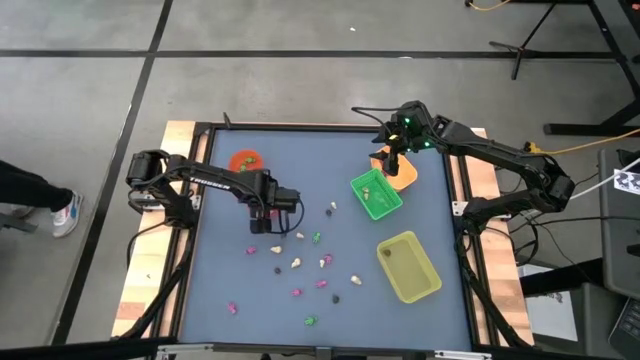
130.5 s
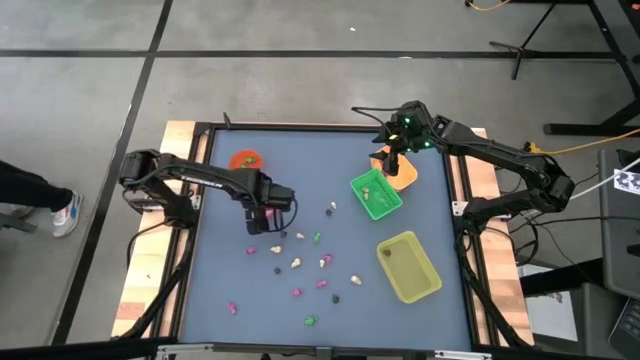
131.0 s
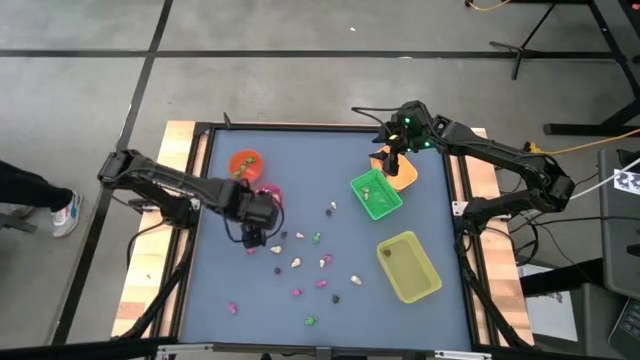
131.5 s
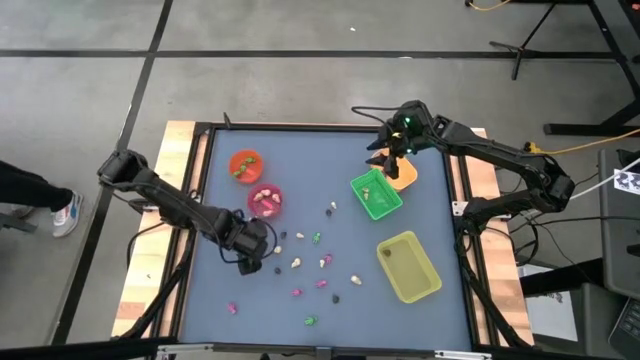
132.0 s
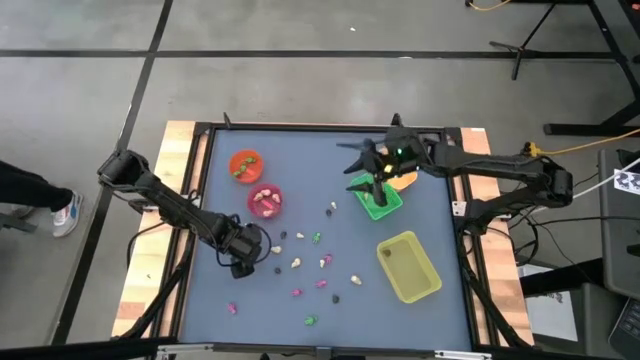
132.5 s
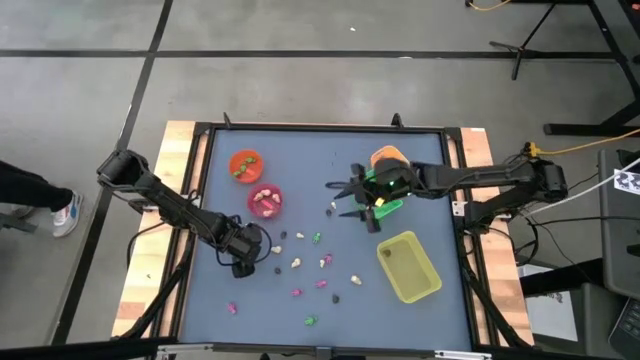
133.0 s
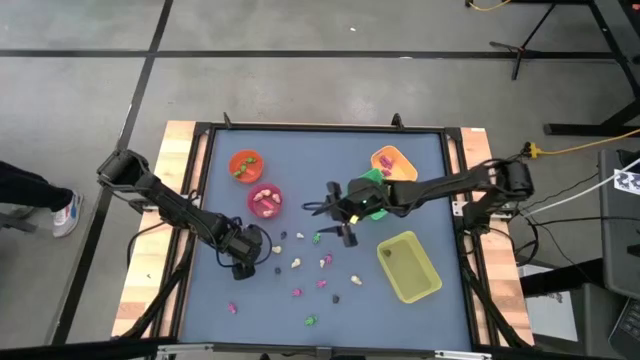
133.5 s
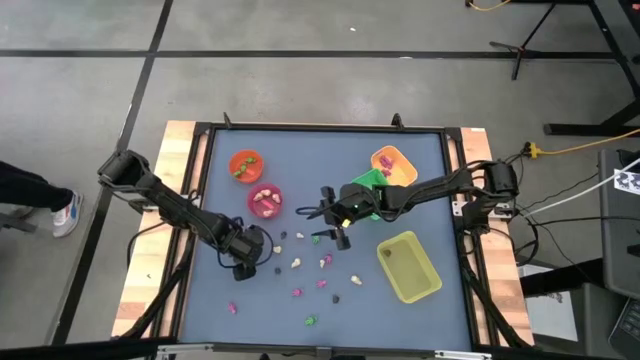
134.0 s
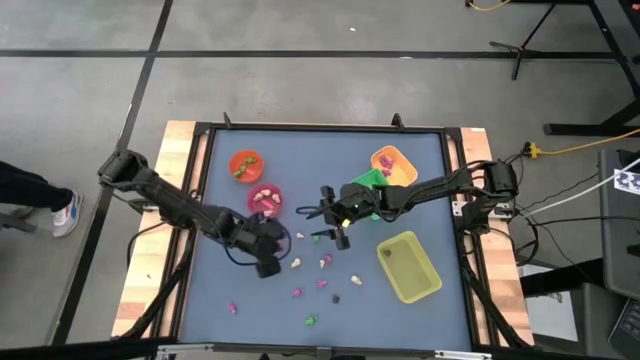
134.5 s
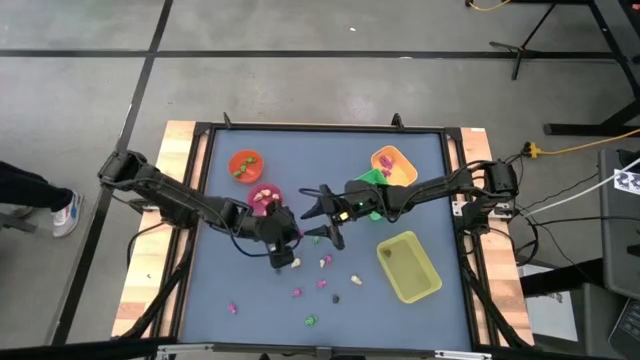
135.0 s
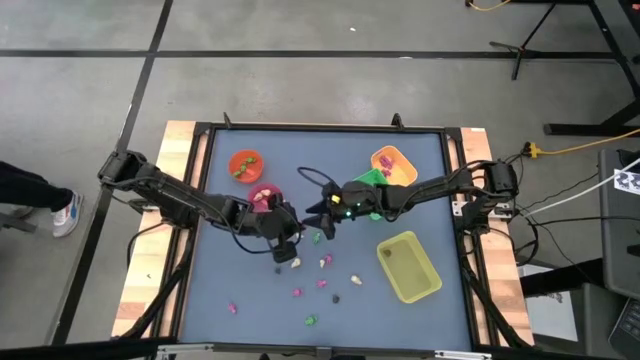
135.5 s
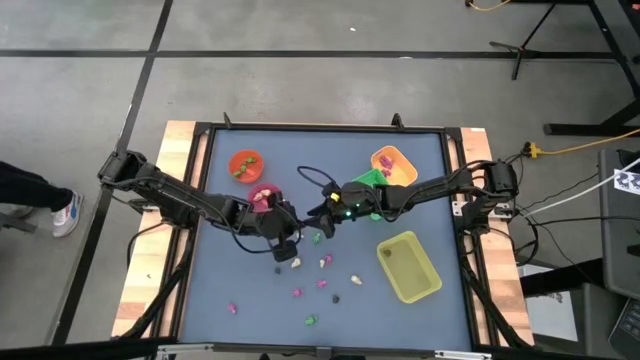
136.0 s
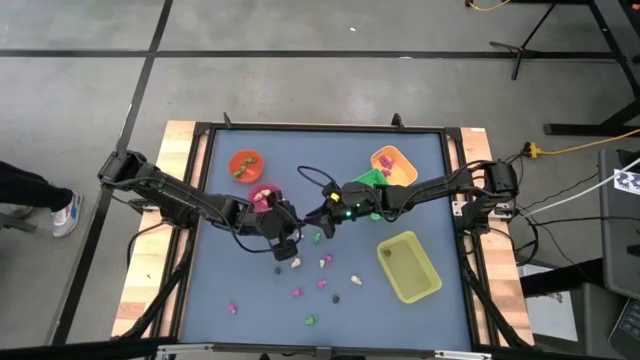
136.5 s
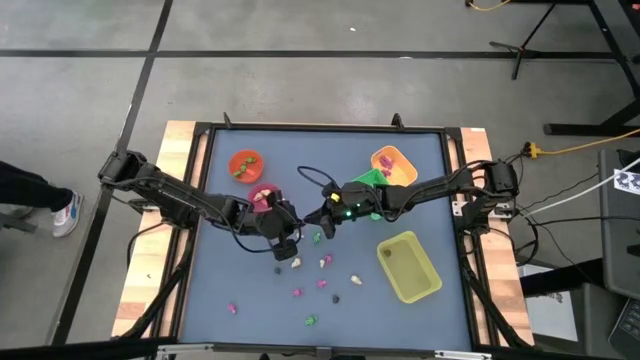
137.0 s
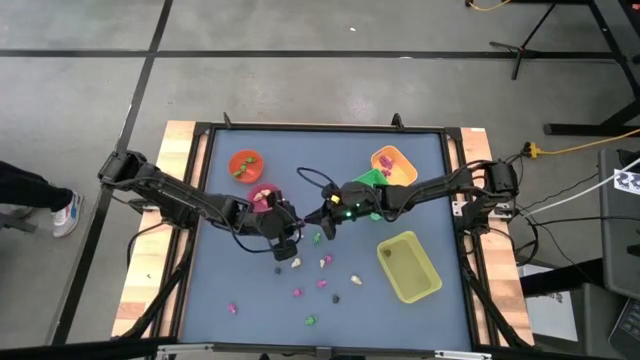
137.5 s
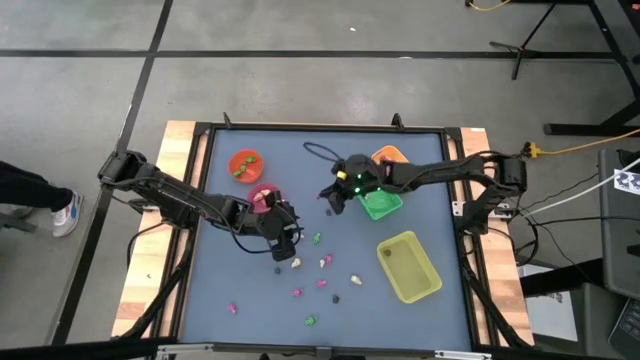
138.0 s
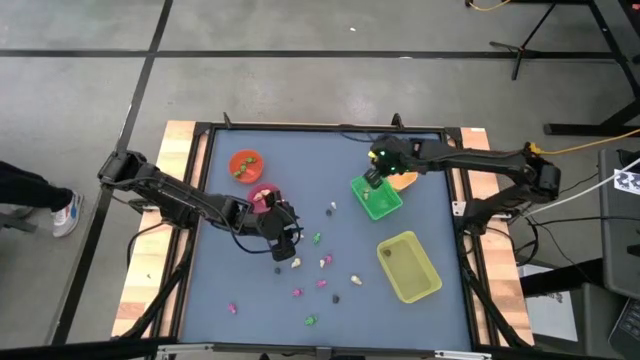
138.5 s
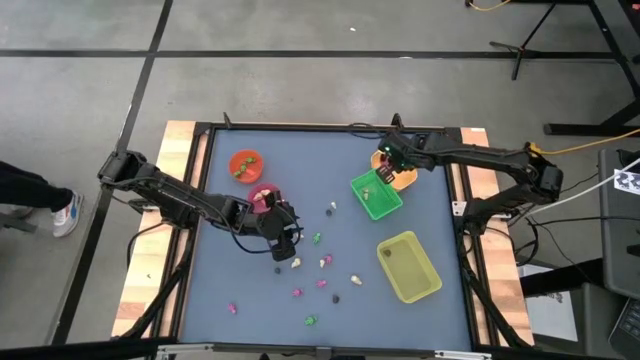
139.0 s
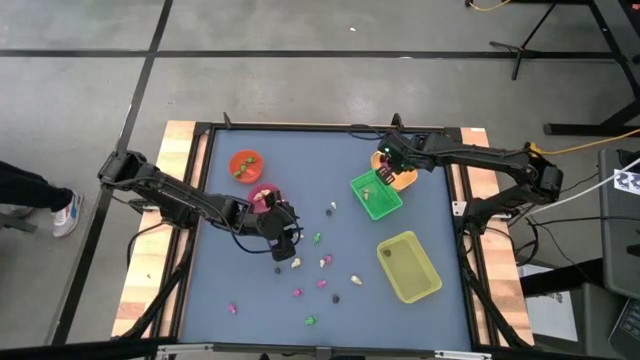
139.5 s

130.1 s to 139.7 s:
Task: Sort Halloween decoration
Put the pink skeleton toy into the yellow bin

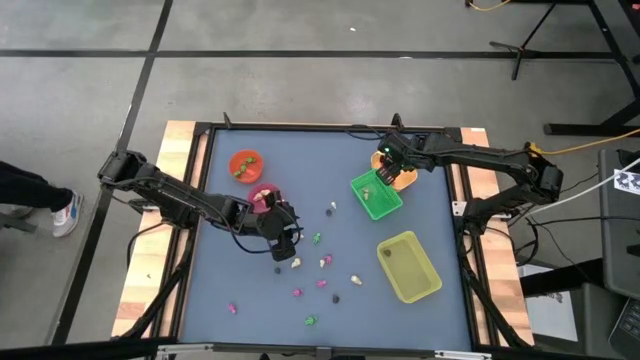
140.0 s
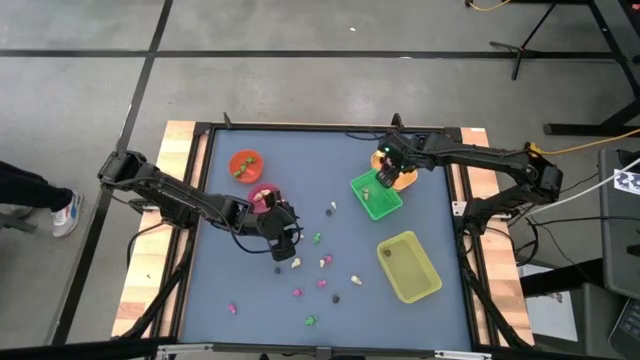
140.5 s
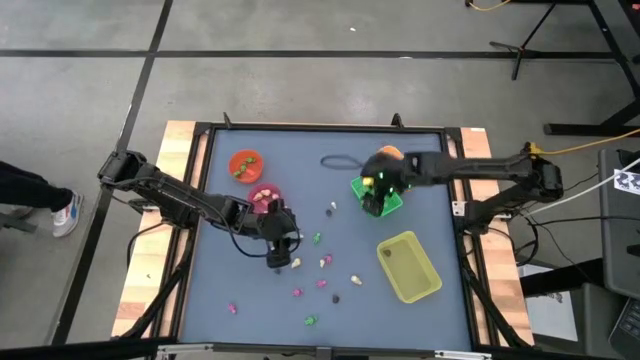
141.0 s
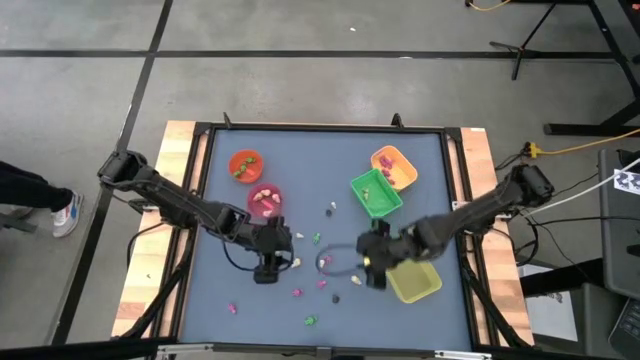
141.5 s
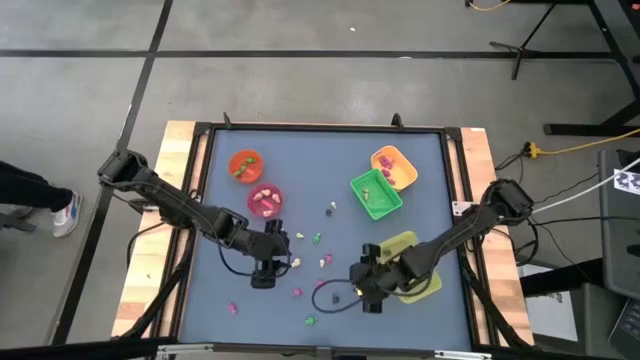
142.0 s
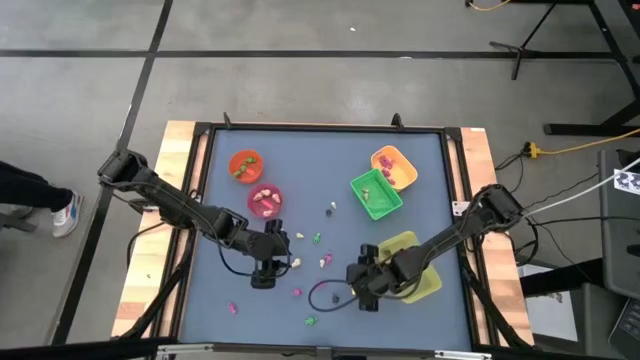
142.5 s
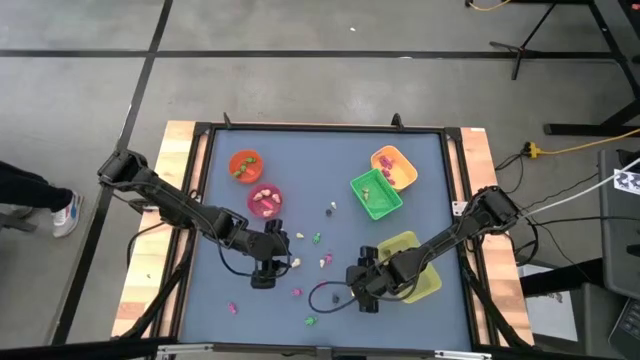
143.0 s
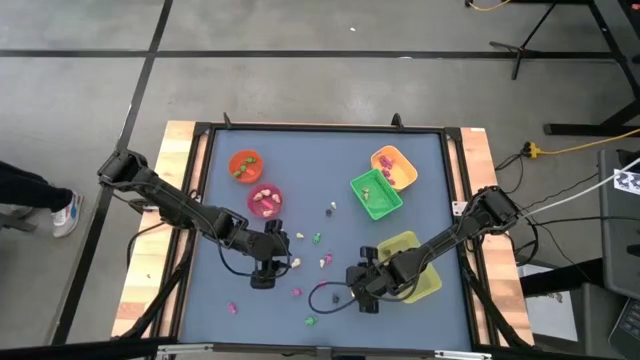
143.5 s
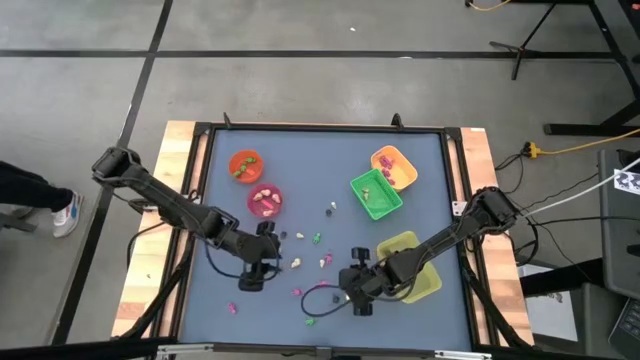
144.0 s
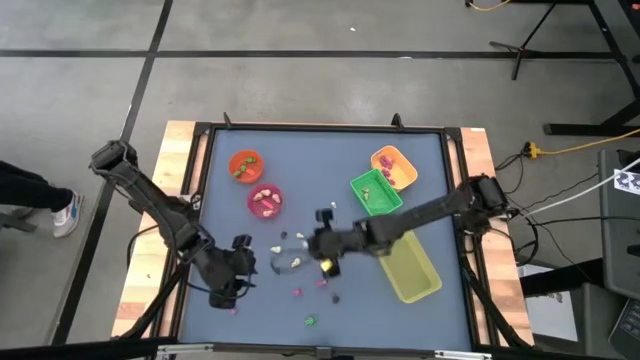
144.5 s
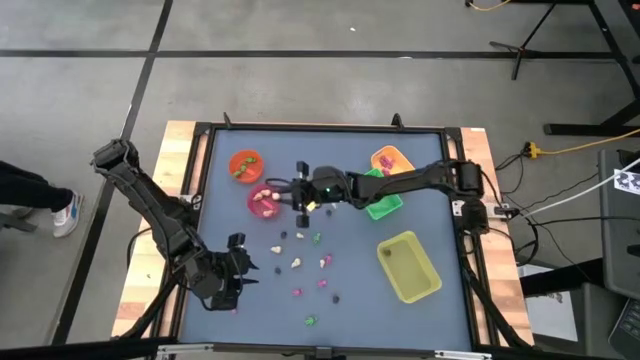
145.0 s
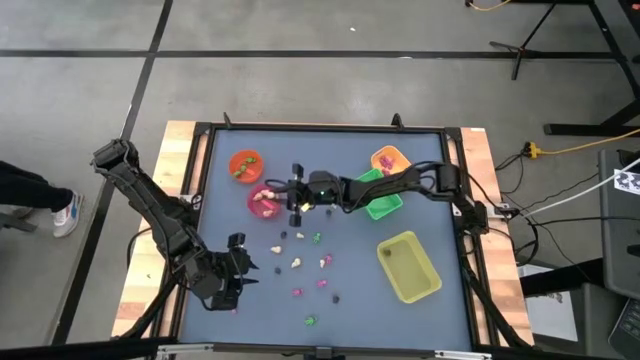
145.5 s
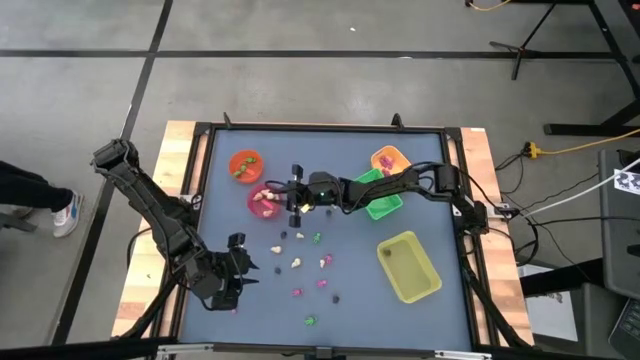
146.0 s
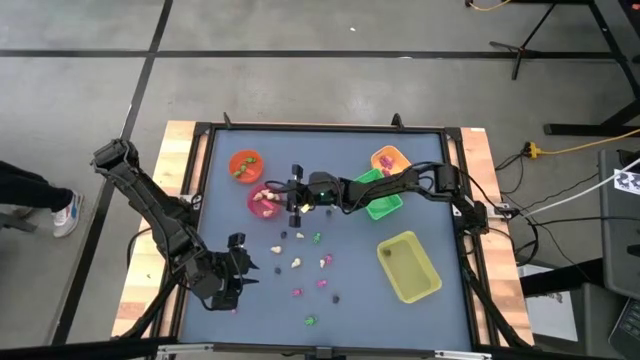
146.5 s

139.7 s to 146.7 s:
Put the white skull toy into the pink bin

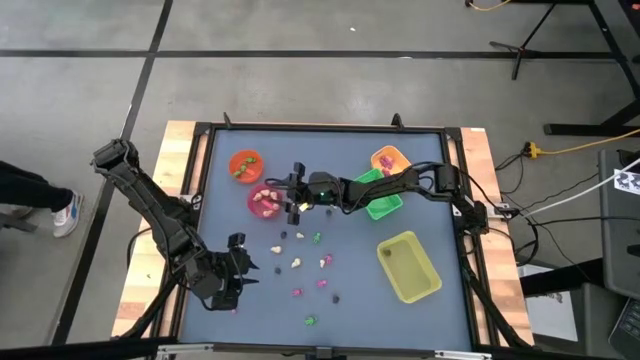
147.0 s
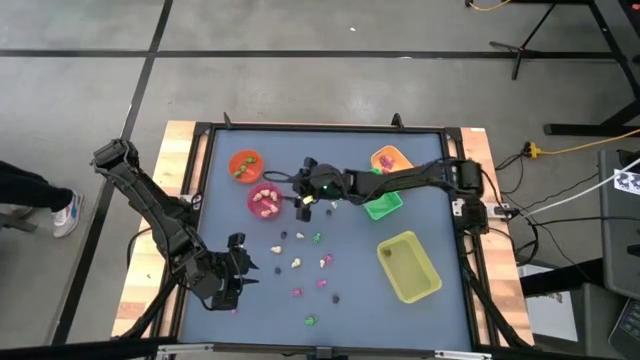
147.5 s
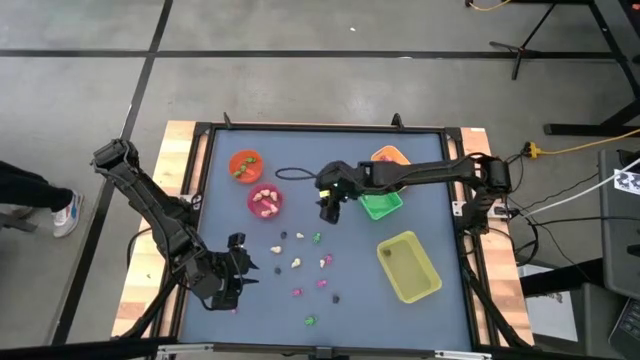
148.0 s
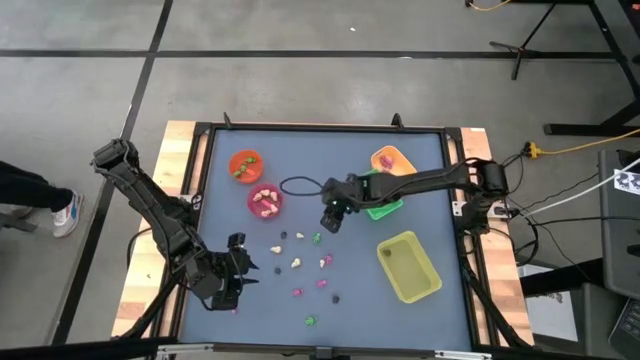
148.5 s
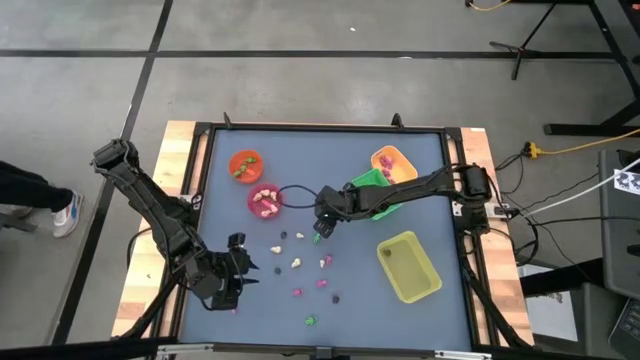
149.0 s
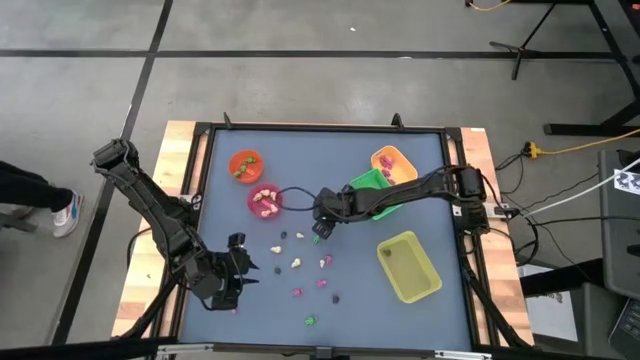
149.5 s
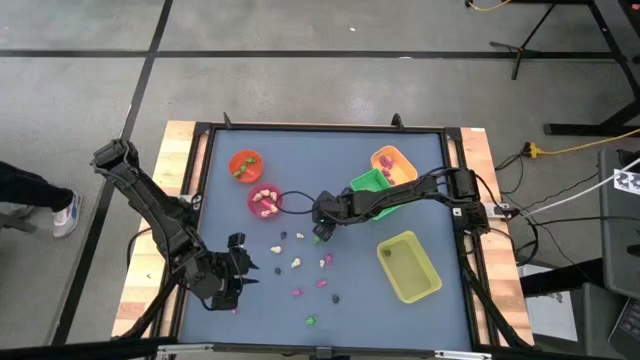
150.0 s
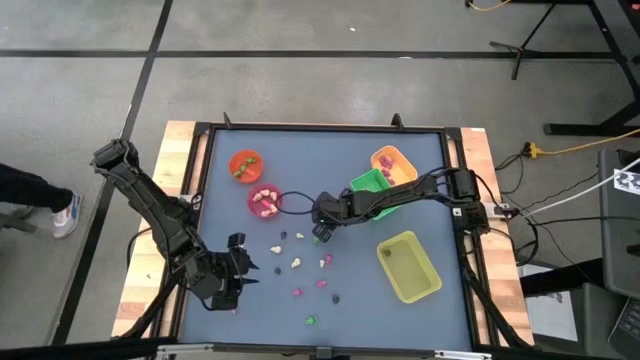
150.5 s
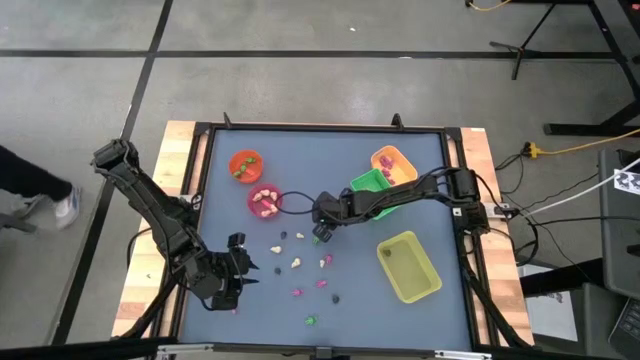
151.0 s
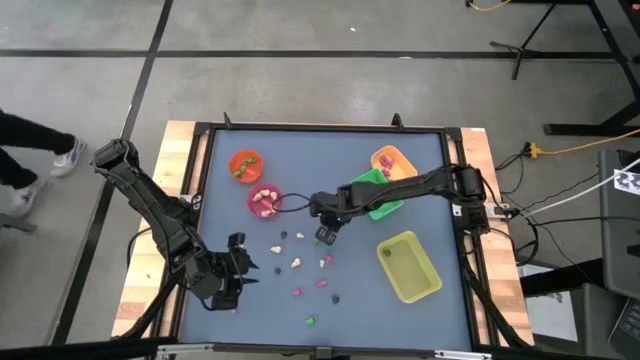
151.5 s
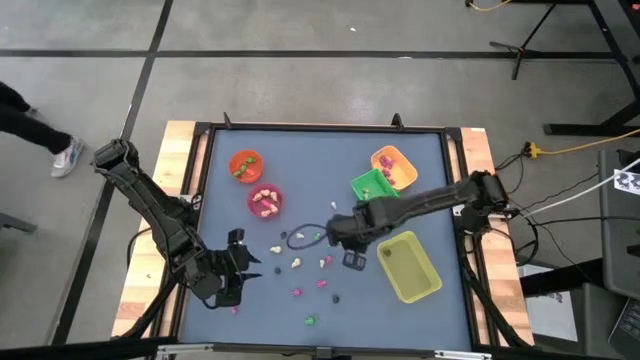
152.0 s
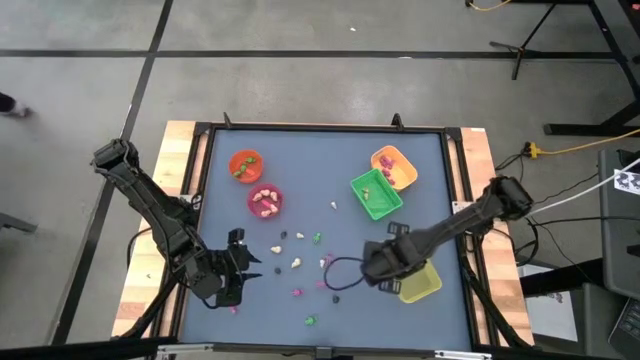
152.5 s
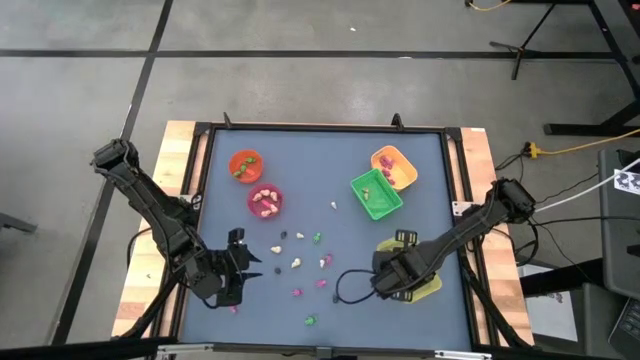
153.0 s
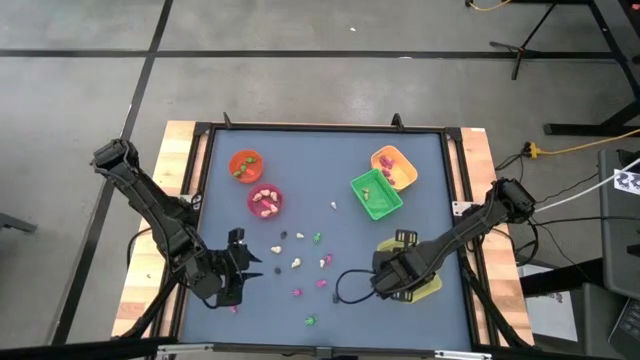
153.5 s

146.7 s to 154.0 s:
Put the black skull toy into the light yellow bin
